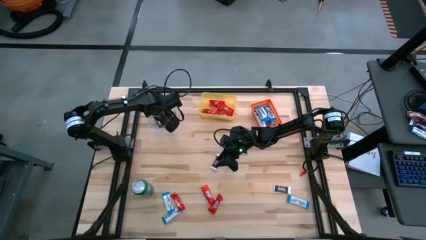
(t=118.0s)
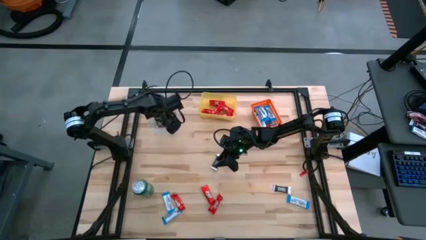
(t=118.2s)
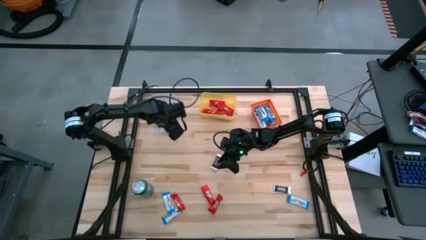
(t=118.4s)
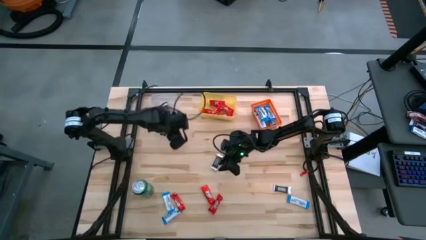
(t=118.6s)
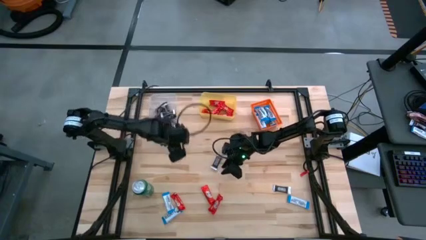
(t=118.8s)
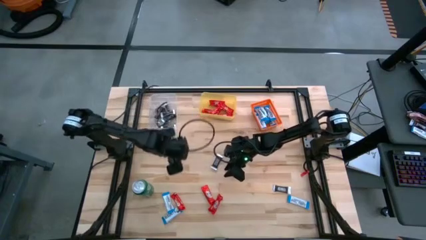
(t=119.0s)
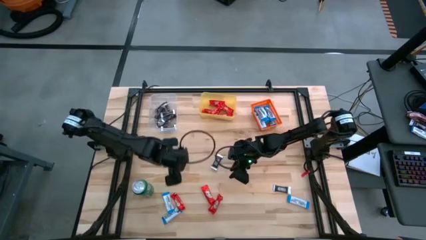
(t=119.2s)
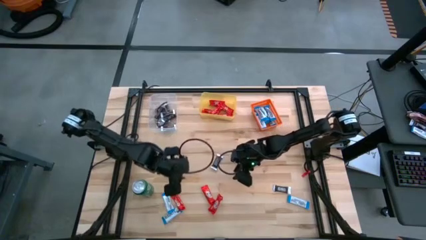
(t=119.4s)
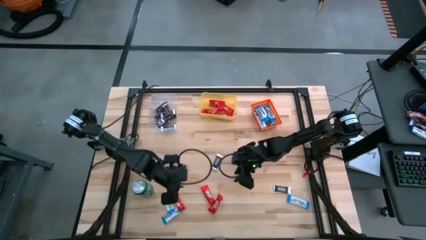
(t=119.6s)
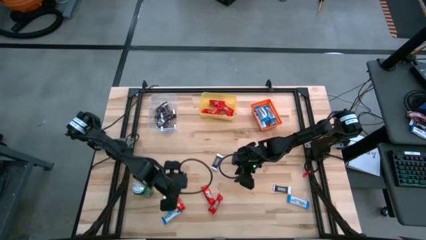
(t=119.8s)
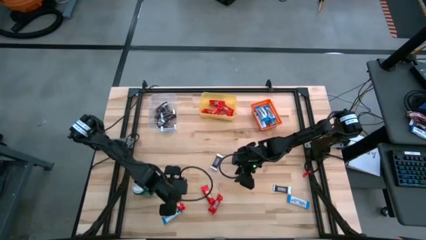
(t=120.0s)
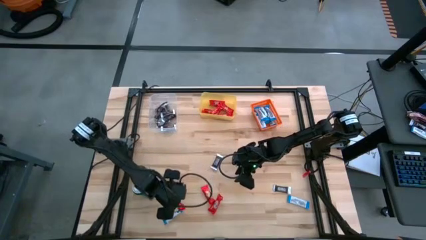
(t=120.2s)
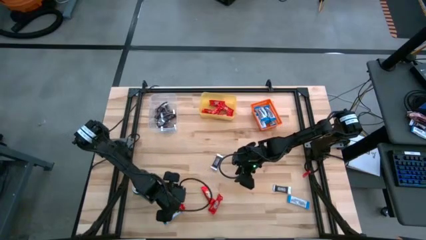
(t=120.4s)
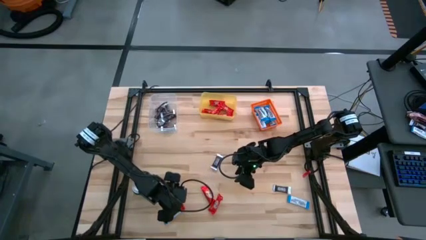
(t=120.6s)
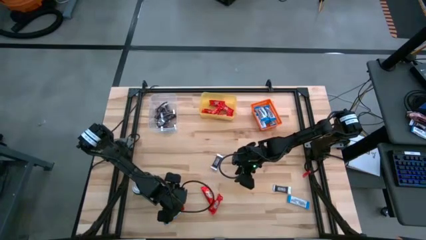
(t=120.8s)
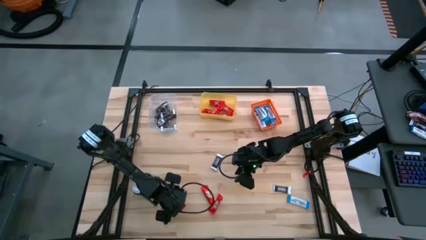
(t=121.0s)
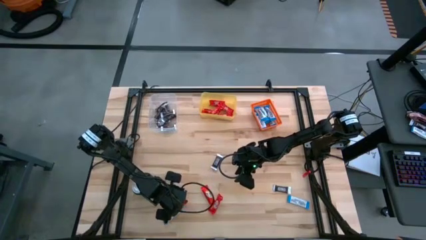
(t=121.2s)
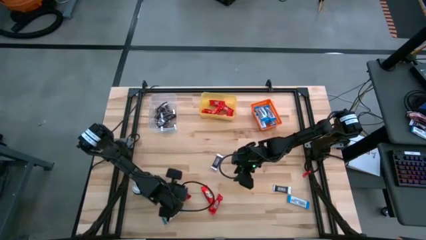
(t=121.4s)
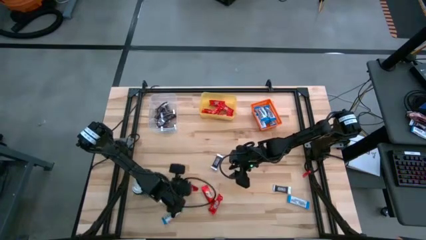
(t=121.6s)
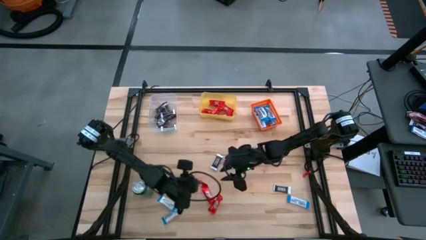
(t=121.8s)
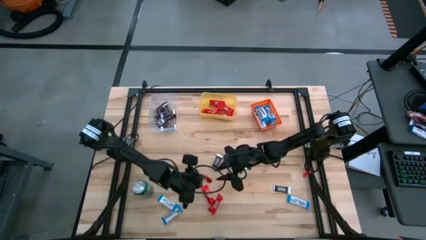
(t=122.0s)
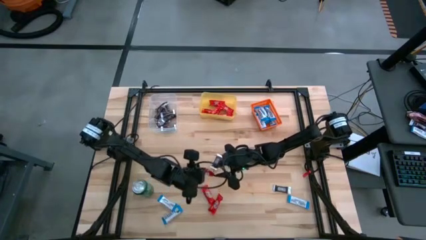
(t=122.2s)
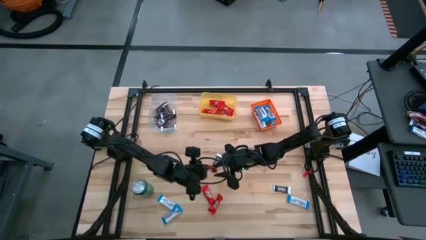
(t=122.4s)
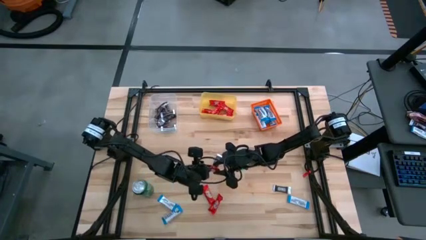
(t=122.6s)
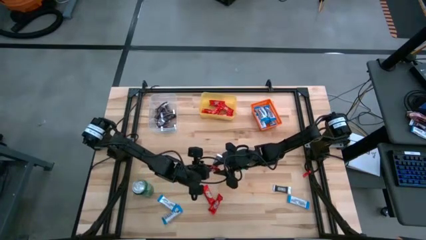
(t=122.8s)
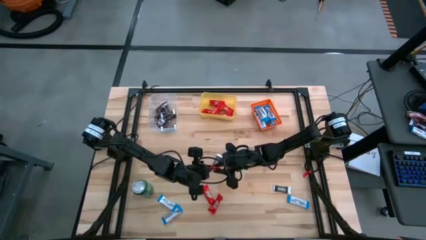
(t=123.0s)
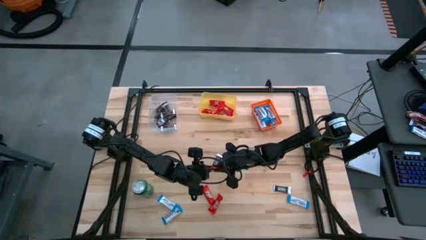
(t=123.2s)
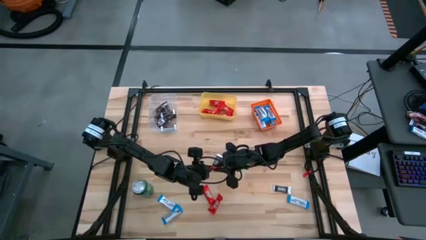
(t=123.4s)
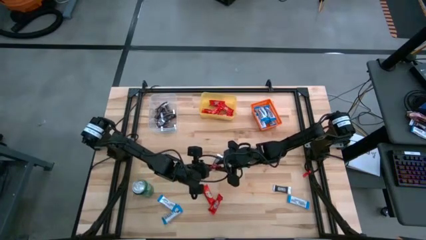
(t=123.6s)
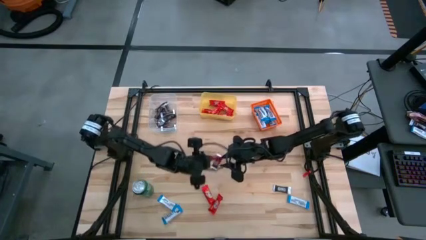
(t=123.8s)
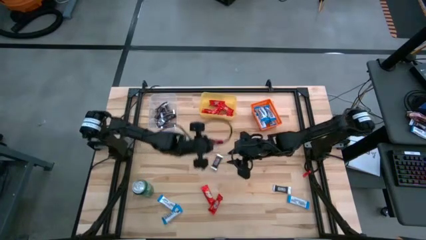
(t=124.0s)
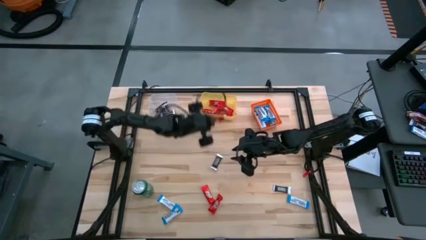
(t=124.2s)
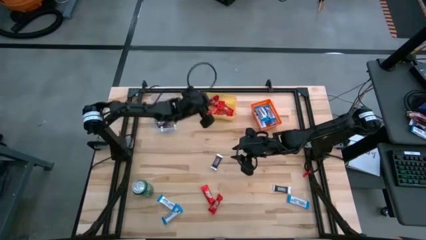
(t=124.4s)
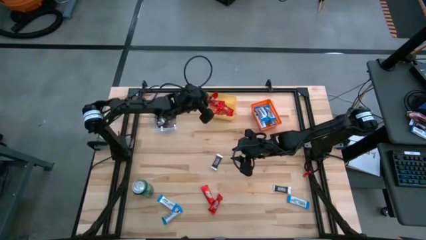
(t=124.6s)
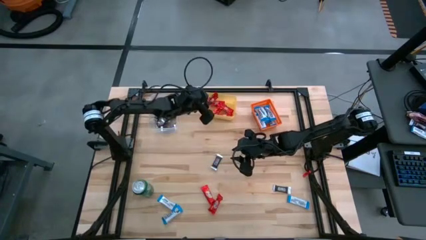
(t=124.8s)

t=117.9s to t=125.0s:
Task: Sort candy
Put the red chocolate bar into the yellow bin

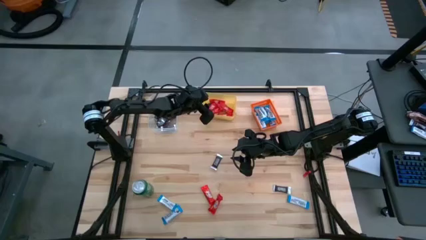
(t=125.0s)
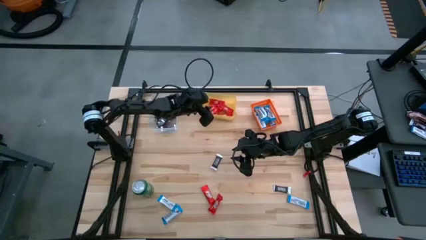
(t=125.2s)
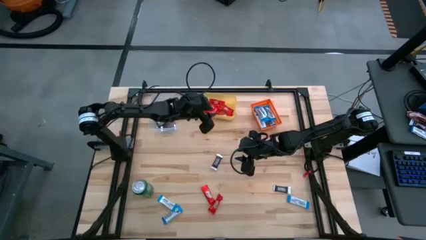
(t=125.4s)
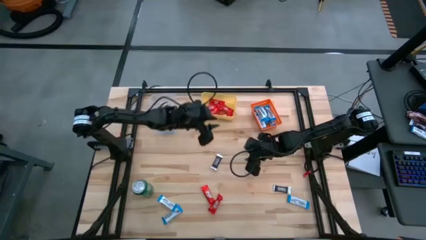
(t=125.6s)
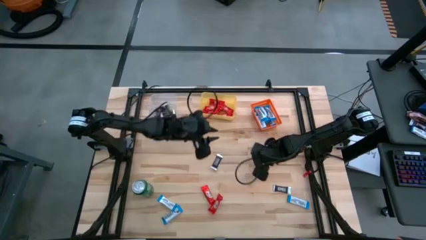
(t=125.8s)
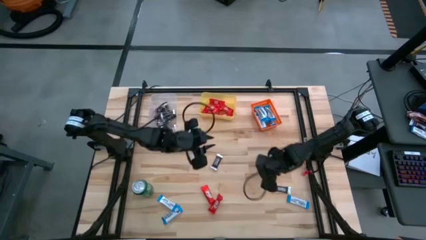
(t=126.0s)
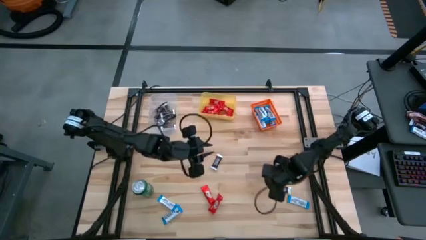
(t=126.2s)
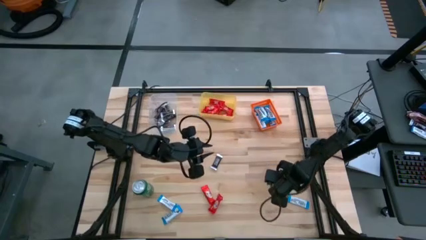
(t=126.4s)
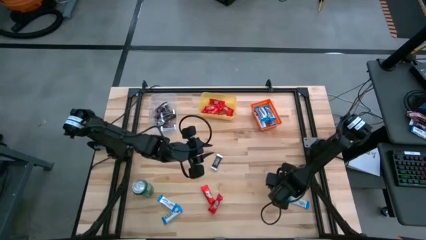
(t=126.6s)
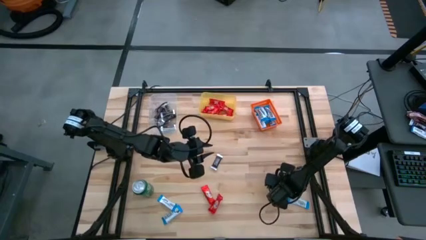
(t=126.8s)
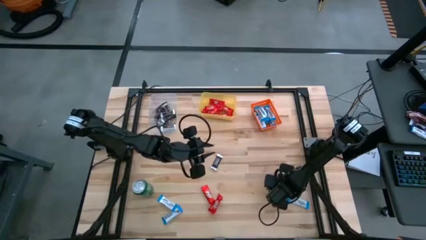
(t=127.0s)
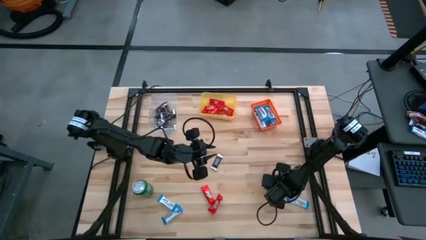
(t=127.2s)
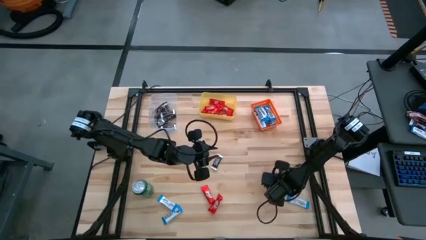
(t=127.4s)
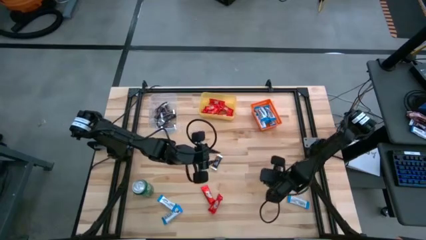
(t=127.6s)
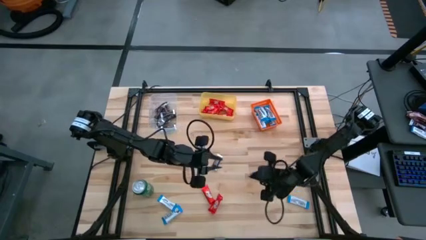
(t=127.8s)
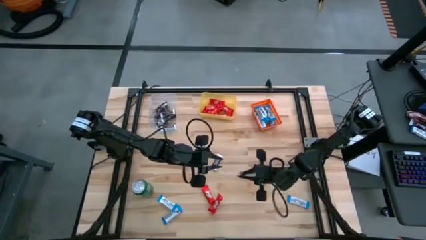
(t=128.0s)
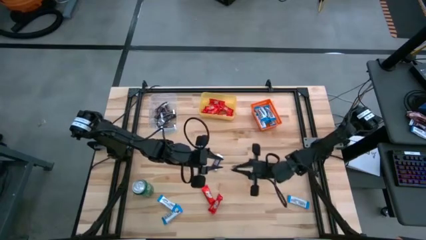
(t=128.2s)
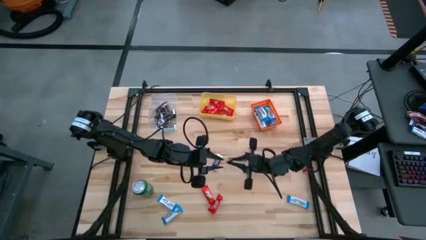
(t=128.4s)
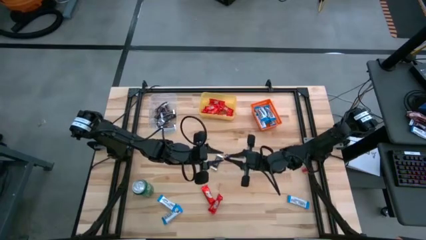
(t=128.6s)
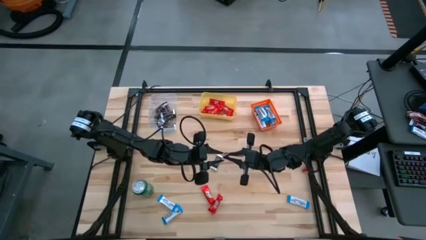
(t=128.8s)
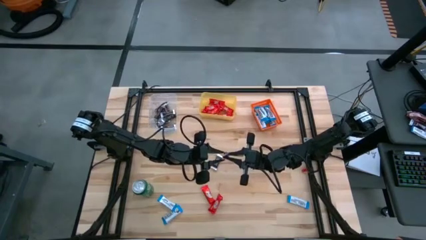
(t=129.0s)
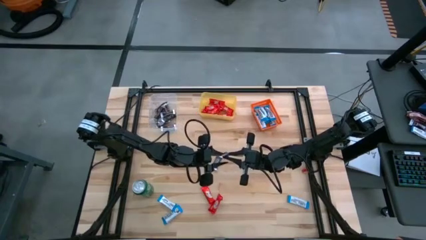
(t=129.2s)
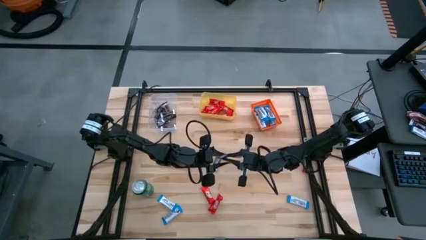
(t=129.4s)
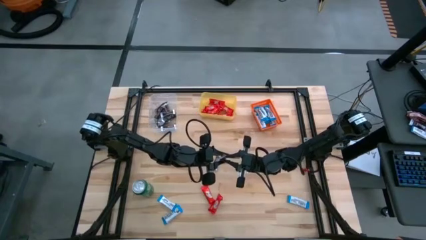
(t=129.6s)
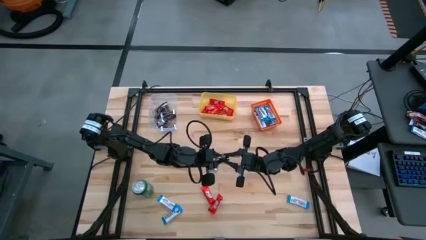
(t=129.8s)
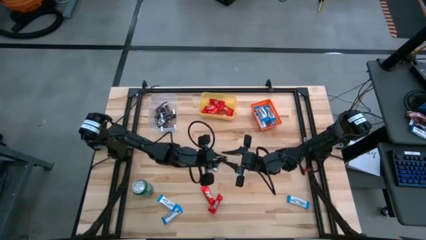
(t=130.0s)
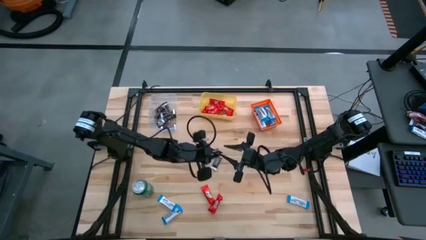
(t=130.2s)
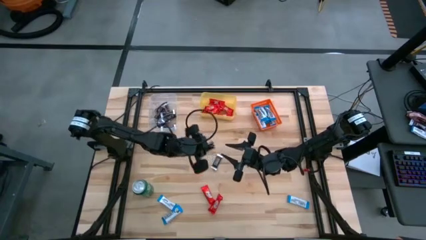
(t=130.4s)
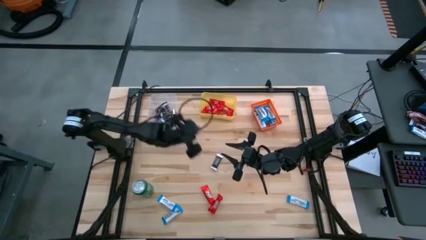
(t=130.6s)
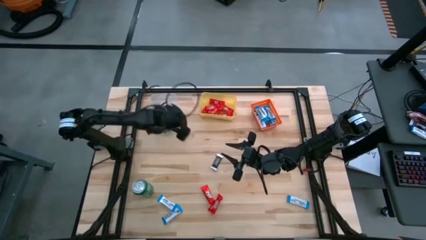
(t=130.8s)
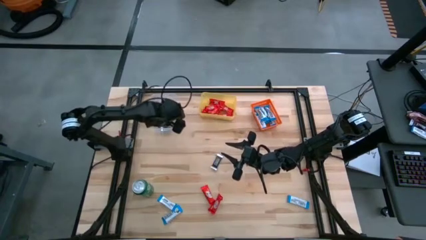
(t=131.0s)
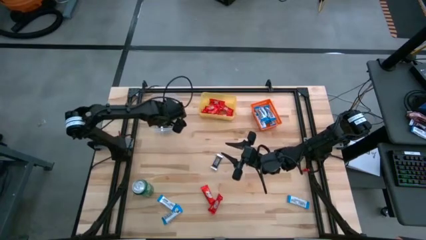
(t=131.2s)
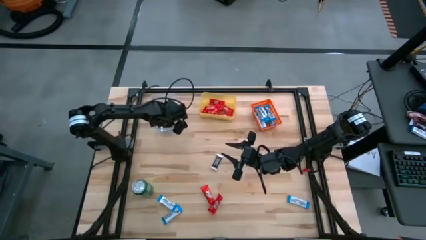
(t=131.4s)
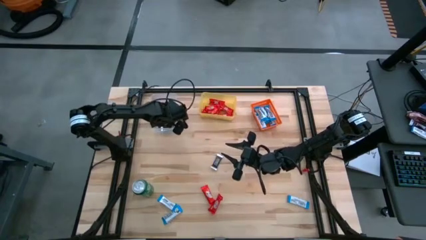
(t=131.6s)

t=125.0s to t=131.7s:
Put the brown chocolate bar into the transparent bin

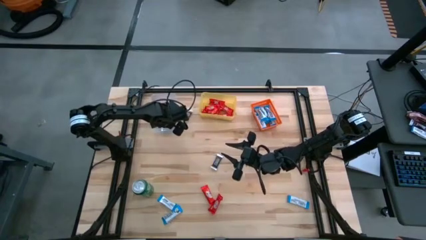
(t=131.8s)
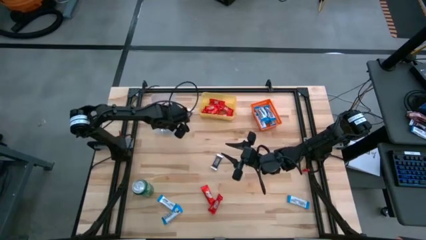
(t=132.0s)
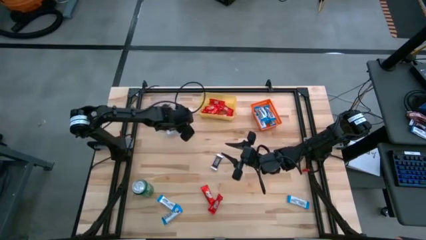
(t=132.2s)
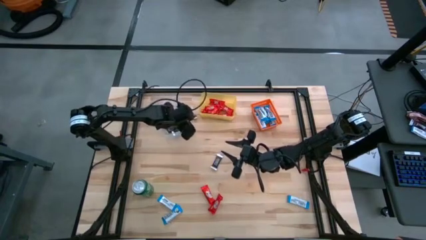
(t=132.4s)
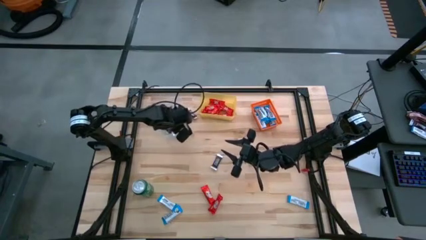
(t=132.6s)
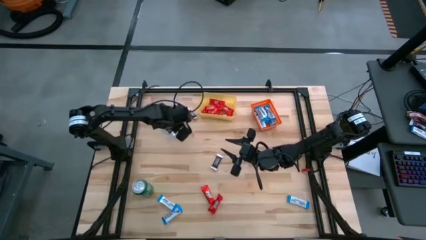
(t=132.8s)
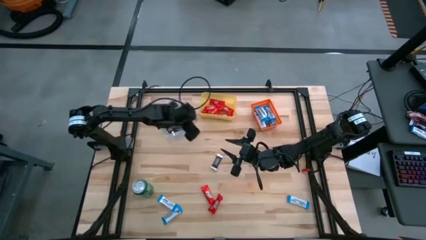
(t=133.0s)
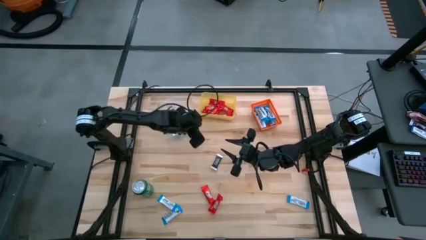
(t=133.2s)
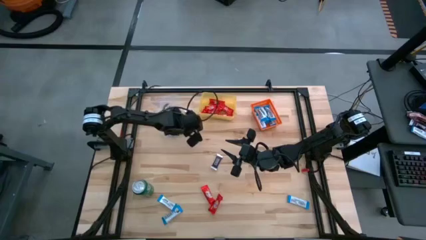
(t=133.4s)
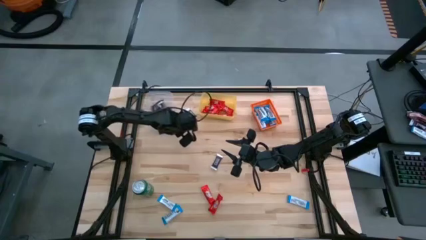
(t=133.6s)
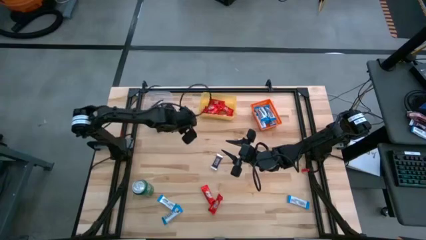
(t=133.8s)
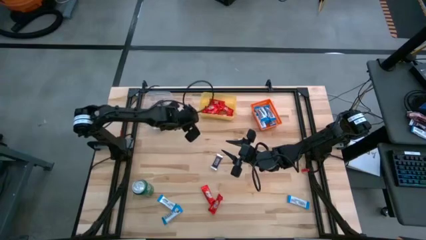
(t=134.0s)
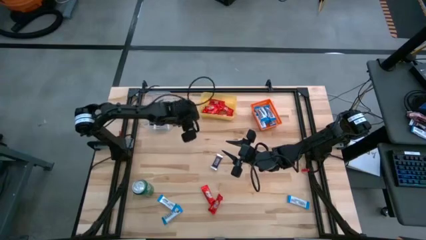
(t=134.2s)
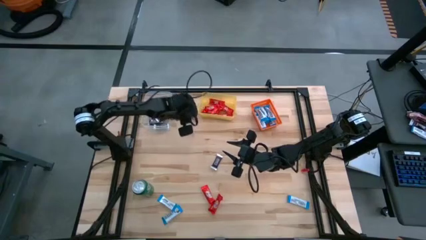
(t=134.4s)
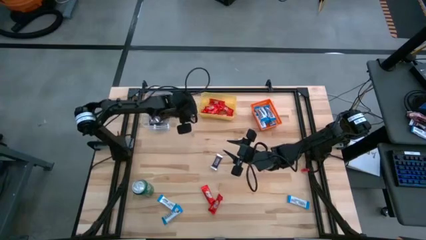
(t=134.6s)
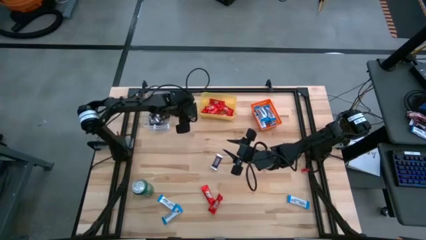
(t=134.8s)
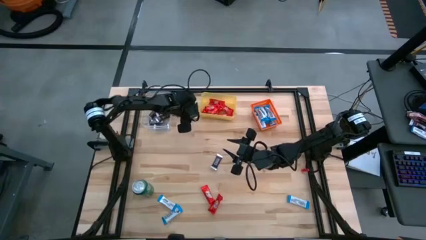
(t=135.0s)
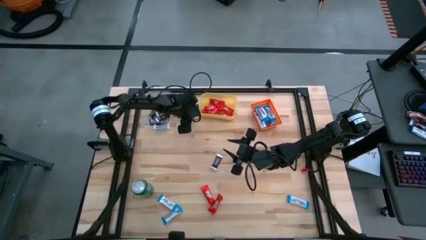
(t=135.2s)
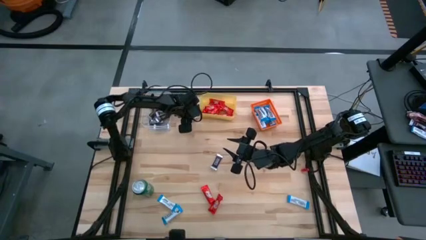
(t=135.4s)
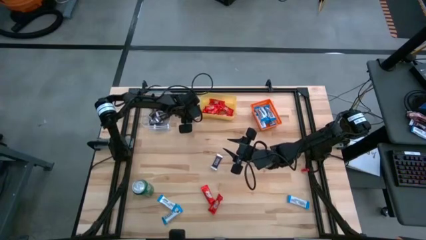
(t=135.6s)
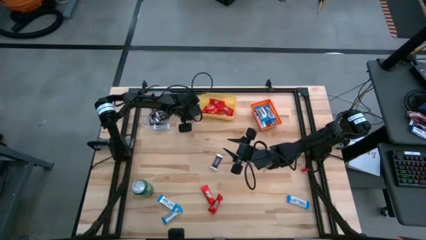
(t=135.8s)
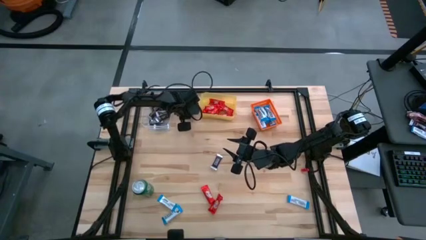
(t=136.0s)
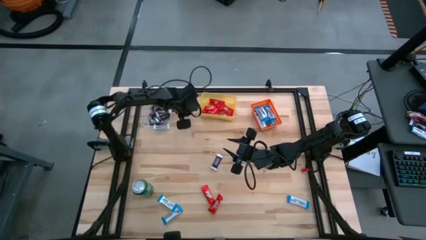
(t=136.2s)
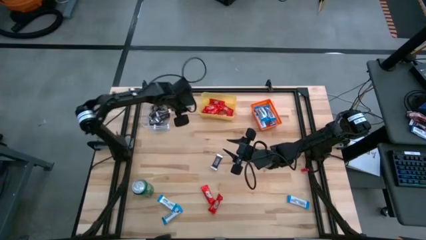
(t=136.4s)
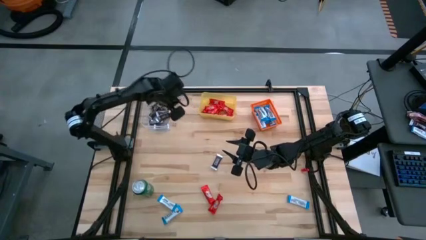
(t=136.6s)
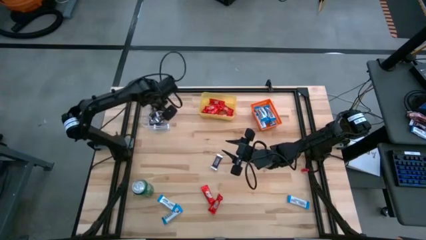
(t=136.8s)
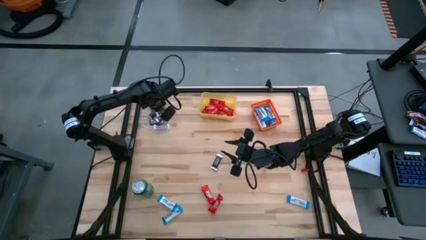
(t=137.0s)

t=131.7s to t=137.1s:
Put the brown chocolate bar into the transparent bin
